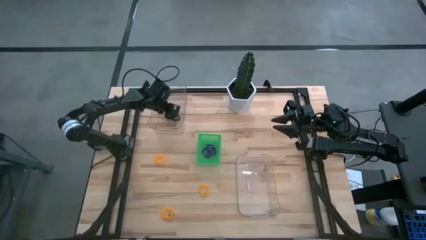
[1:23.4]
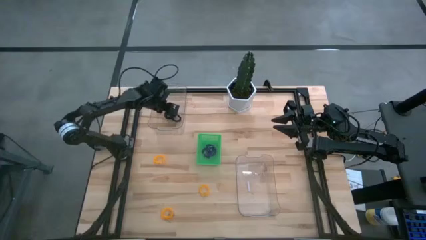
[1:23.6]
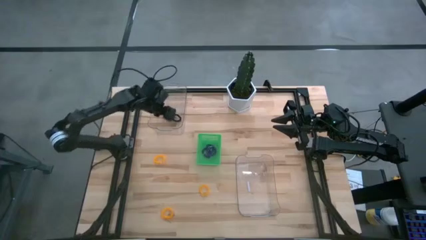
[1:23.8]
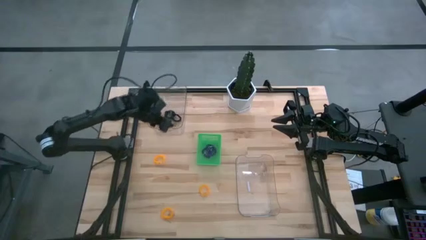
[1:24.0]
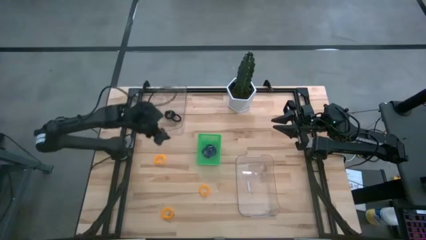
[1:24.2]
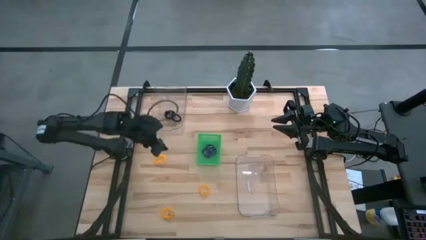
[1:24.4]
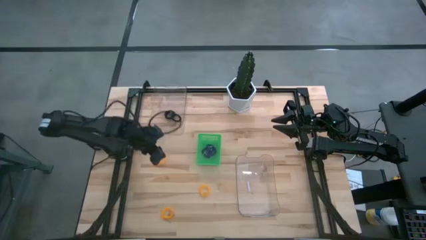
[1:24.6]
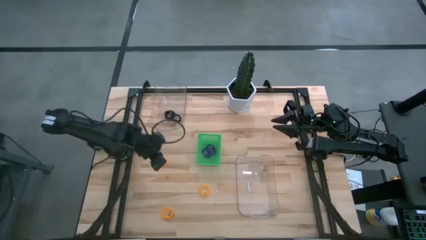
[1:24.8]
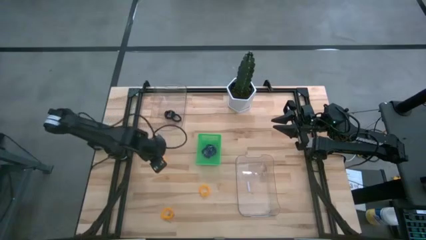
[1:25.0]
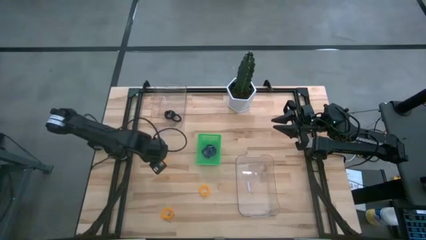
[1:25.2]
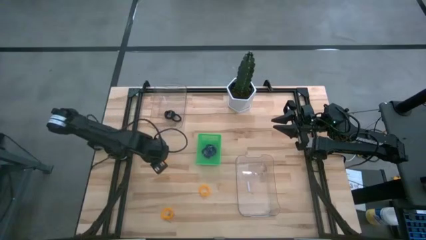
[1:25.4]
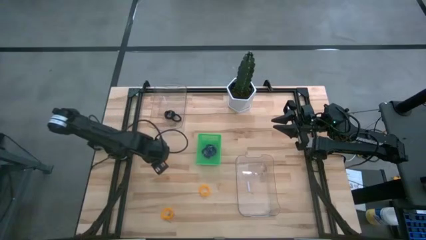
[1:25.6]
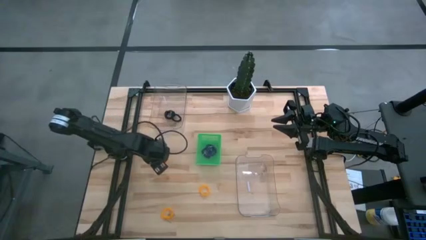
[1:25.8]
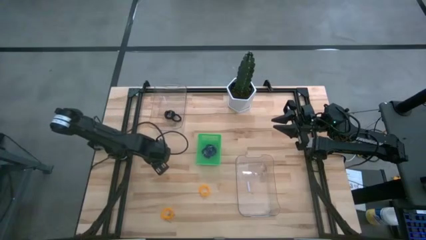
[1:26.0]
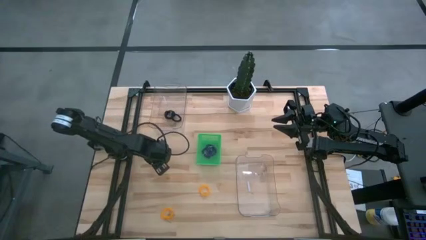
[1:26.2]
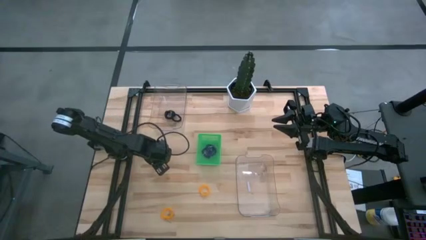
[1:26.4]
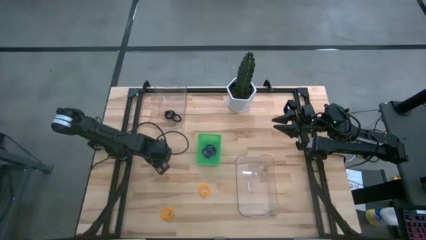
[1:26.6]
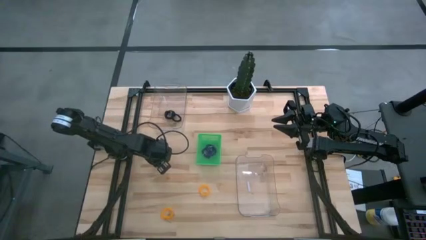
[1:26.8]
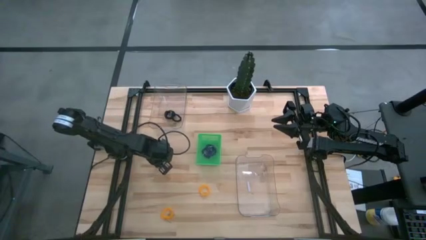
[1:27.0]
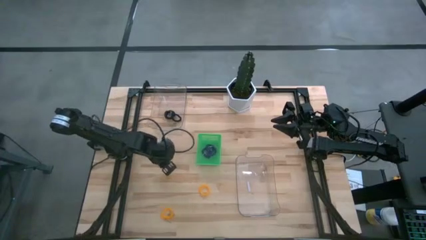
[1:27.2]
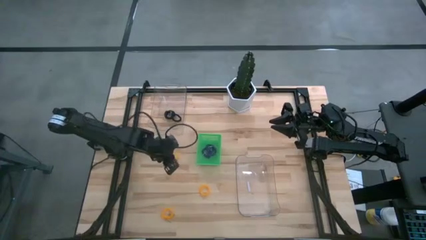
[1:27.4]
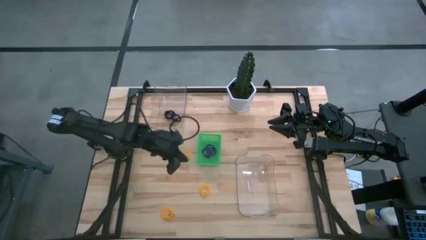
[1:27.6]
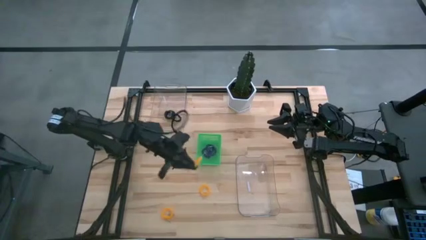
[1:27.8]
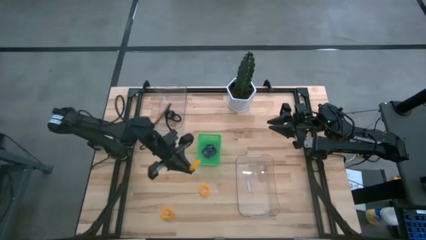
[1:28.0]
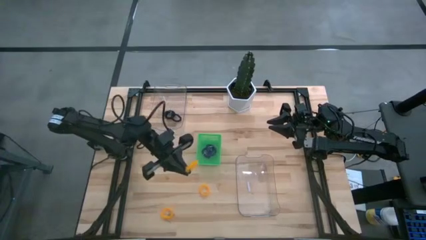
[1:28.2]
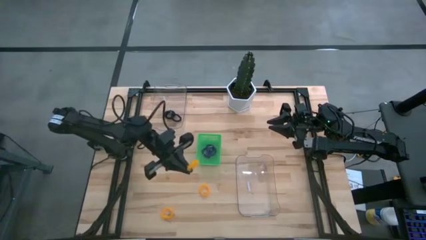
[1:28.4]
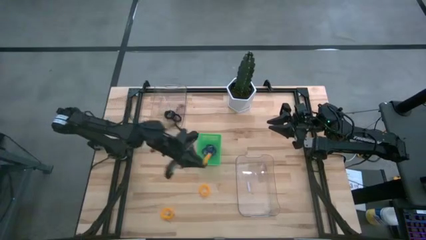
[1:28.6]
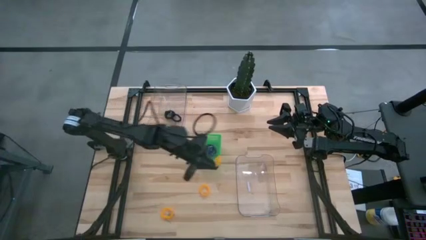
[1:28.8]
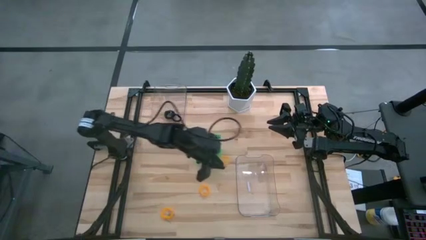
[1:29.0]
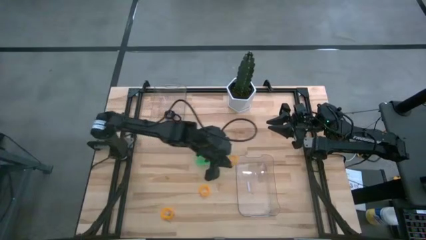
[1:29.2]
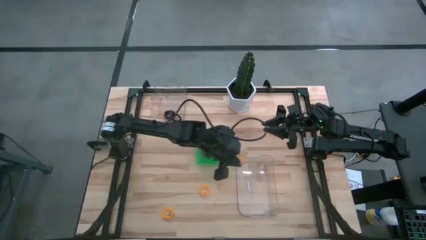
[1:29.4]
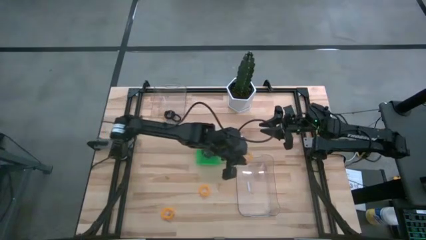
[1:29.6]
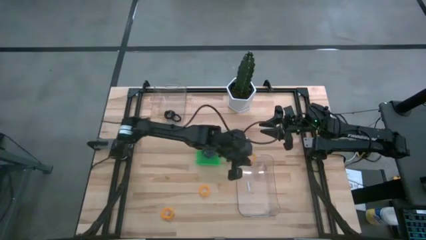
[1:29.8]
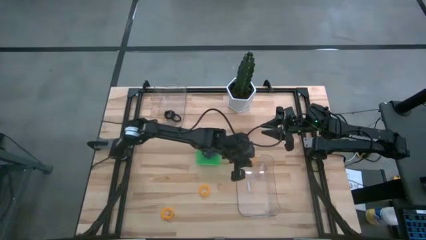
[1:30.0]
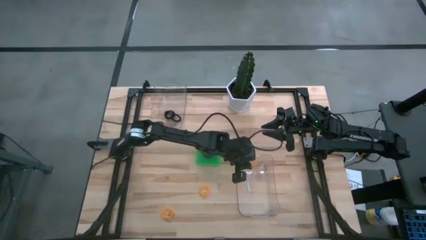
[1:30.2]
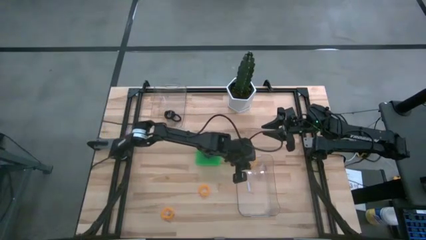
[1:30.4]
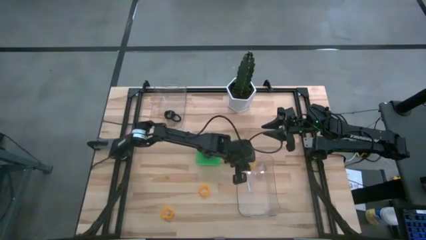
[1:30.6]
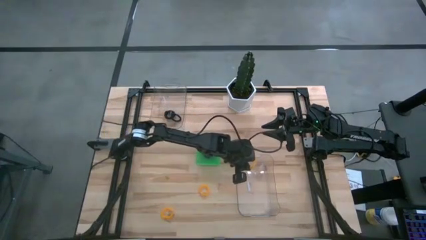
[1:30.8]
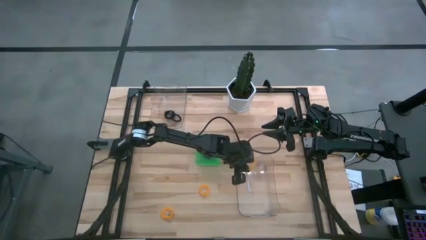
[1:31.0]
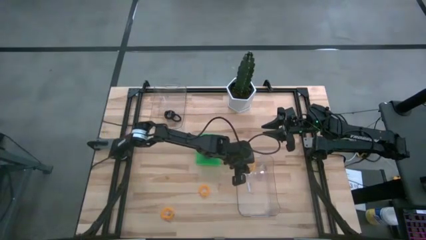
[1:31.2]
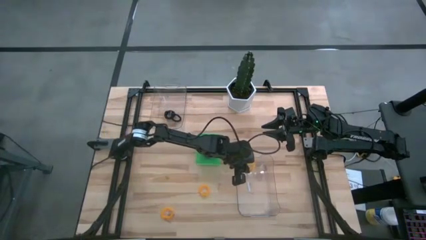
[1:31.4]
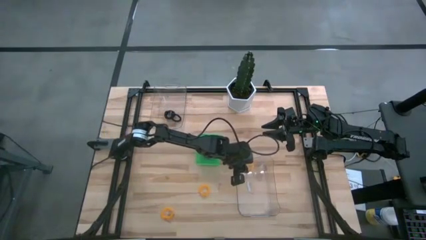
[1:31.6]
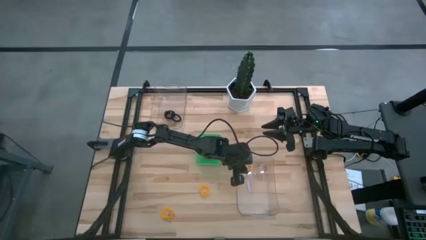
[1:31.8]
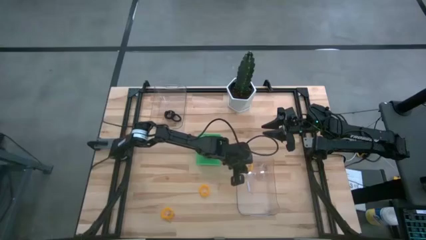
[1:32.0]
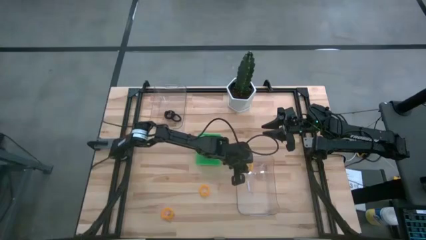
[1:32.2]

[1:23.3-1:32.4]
Task: Sort spring keychains
Put the top yellow spring keychain into the bottom transparent bin

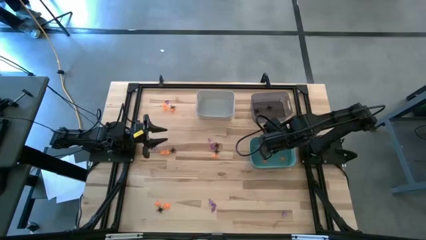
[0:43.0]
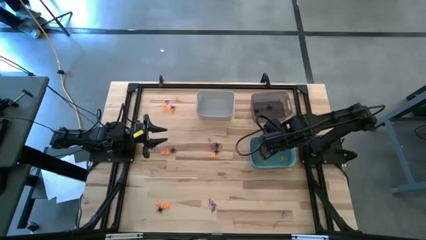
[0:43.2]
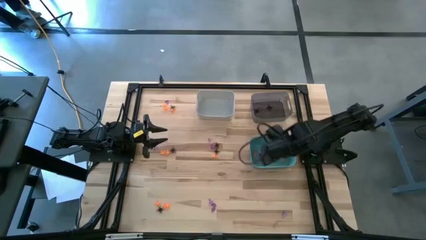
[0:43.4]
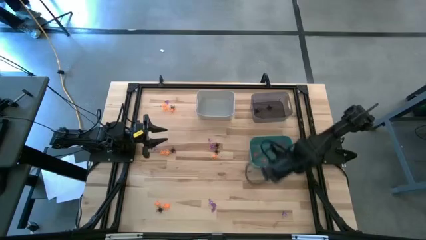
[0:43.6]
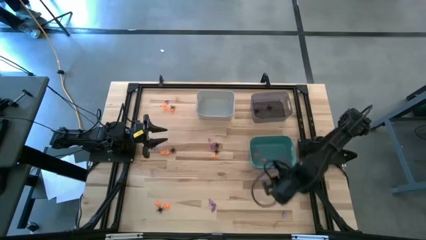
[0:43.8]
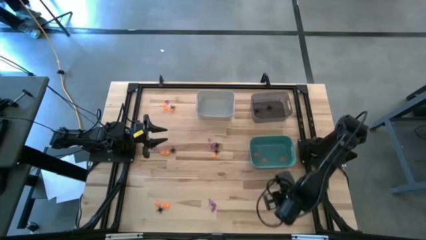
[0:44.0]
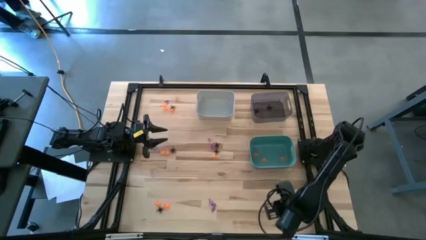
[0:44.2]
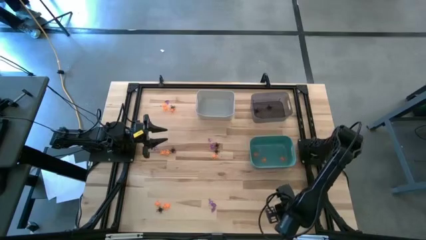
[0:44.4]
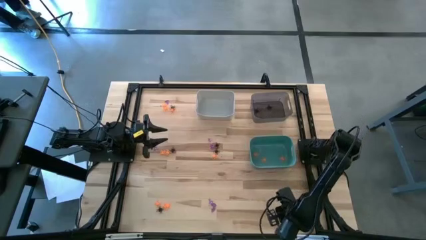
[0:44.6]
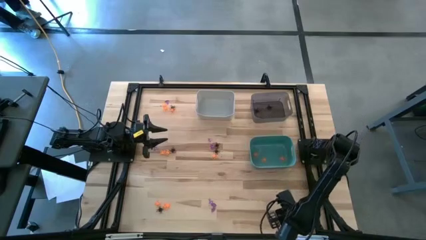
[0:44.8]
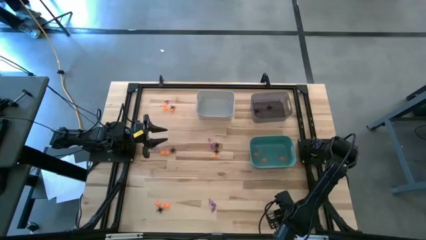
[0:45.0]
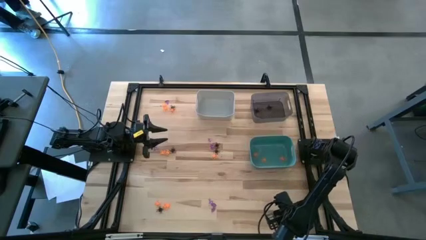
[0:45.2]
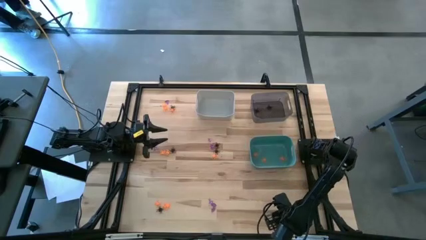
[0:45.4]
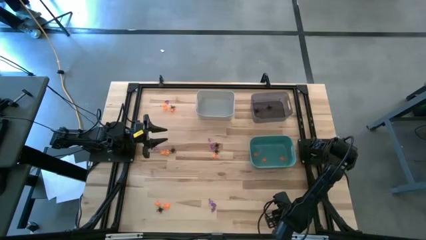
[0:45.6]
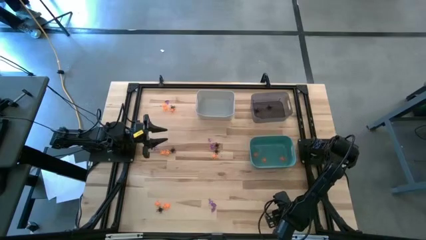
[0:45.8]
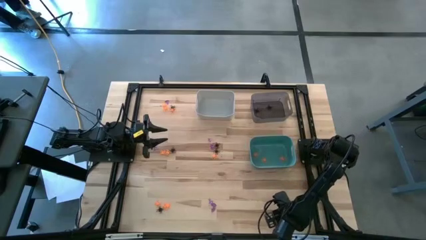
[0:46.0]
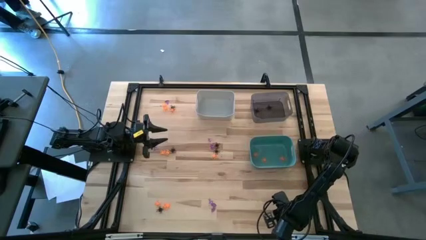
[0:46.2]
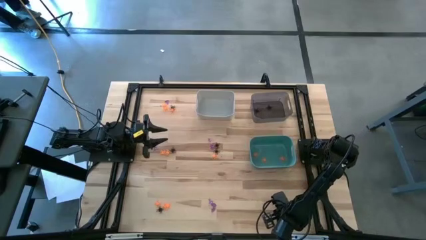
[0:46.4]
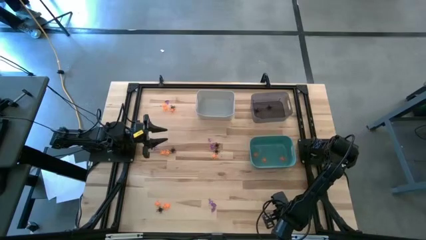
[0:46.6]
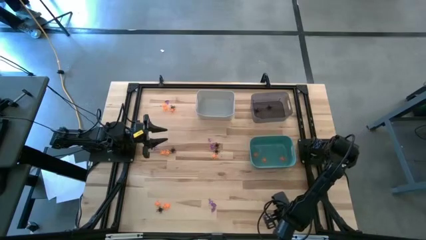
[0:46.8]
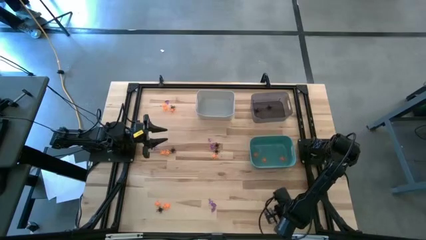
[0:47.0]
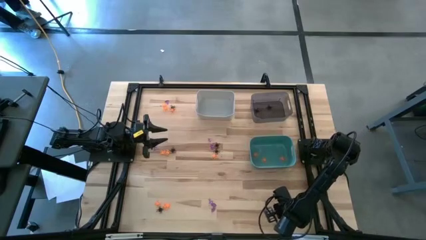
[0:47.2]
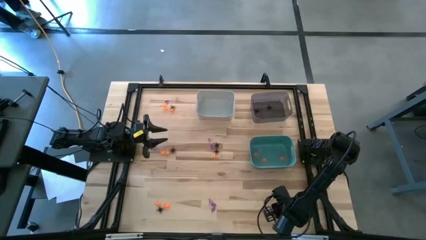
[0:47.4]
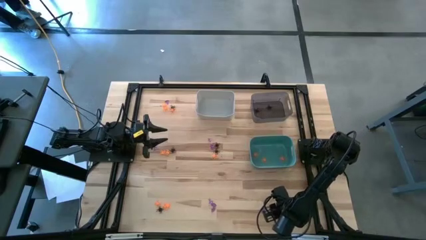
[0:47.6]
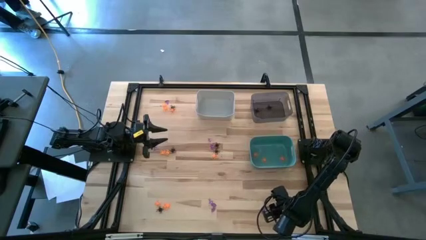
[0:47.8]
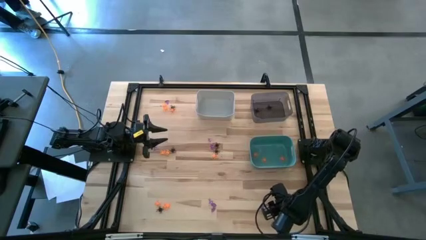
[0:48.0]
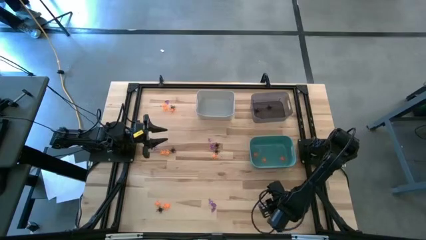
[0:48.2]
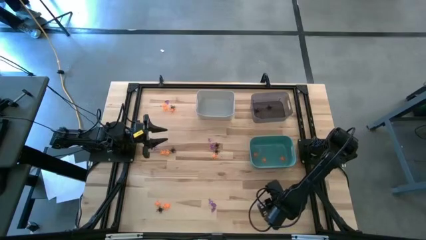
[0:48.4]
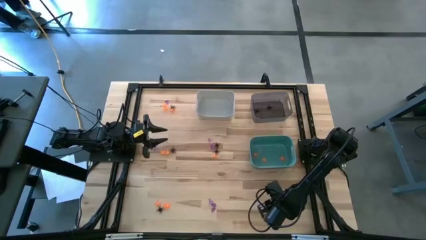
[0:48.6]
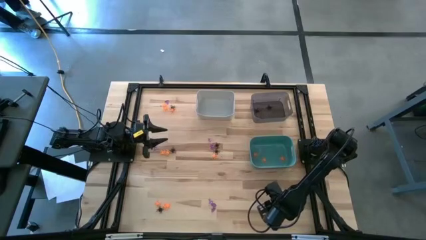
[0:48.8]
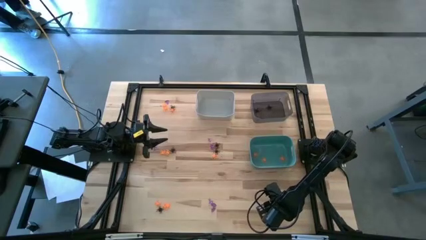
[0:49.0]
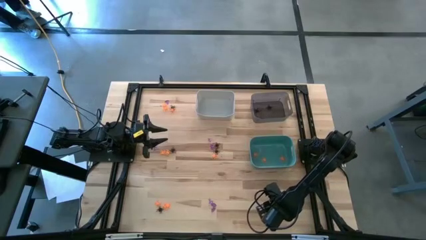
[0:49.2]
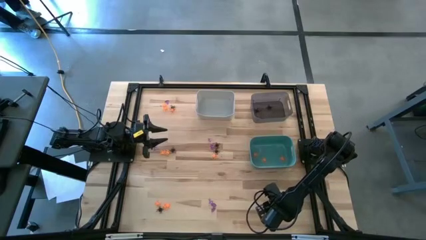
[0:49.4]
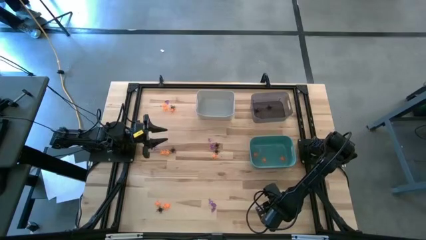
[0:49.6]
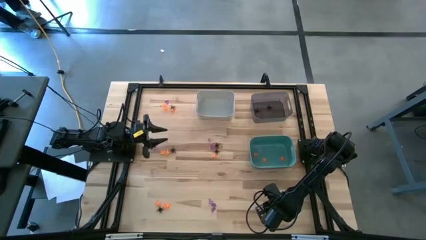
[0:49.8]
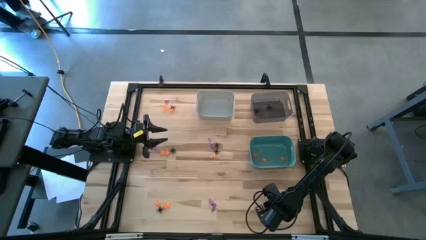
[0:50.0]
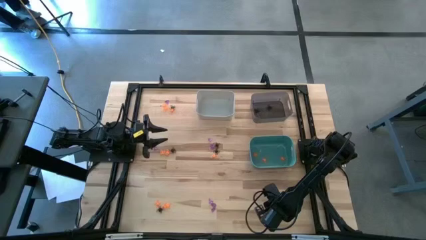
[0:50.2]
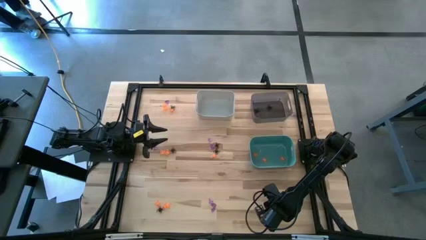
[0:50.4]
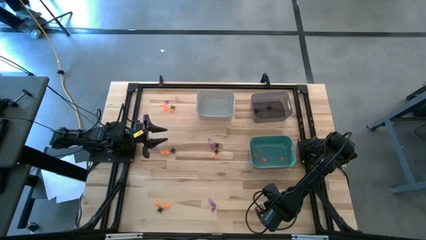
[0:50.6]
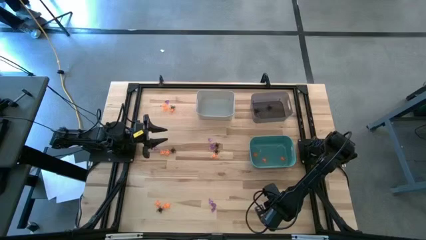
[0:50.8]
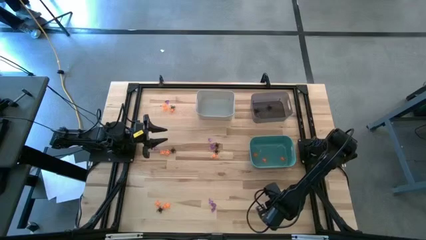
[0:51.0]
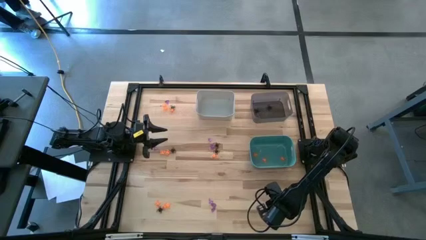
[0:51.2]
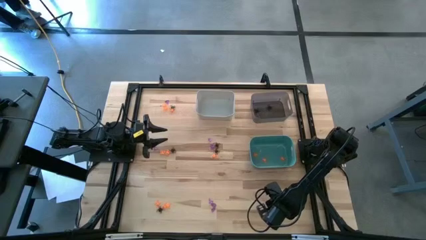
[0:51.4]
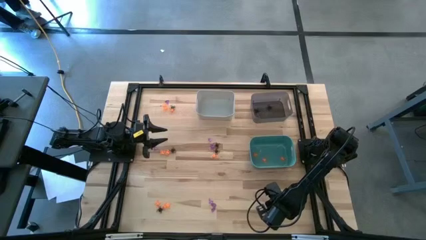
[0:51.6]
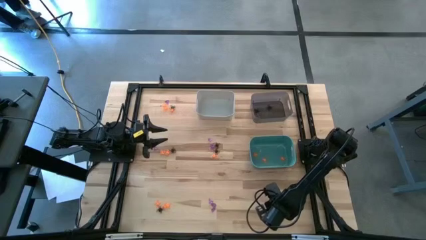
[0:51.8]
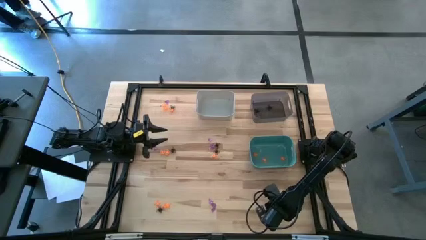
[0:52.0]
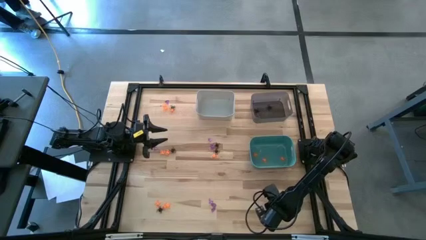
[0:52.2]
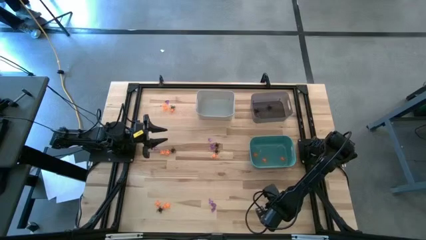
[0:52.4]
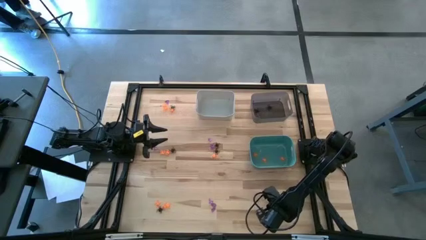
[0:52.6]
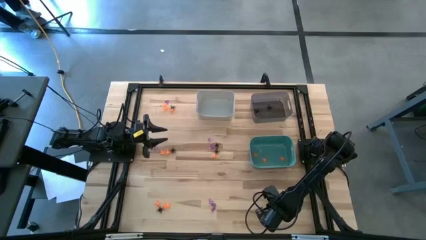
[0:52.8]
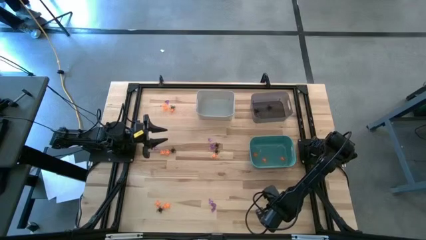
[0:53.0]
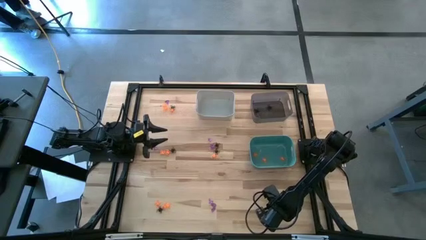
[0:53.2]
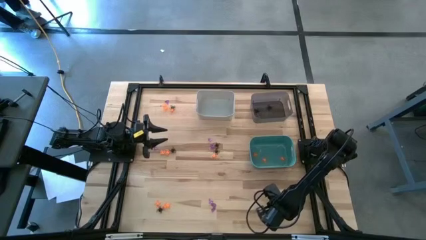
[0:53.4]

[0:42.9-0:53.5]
Task: Sort Halloween decoration
Put the purple witch hat toy into the white bin
